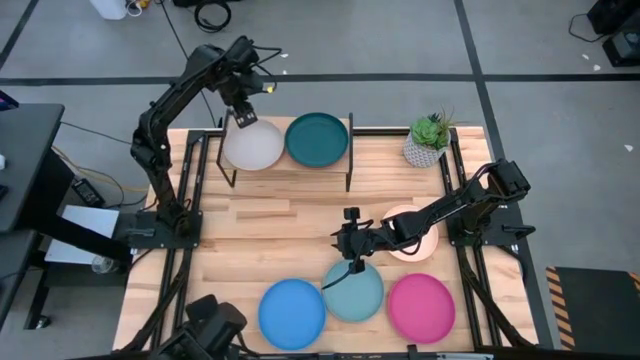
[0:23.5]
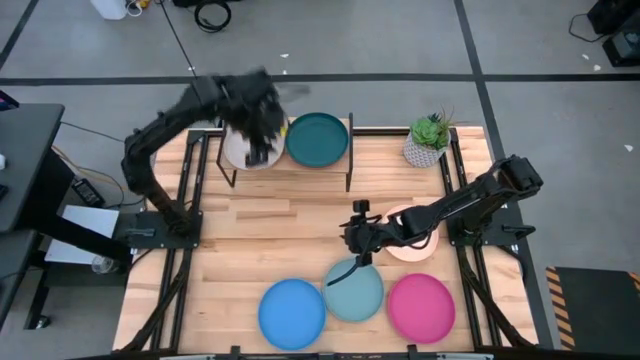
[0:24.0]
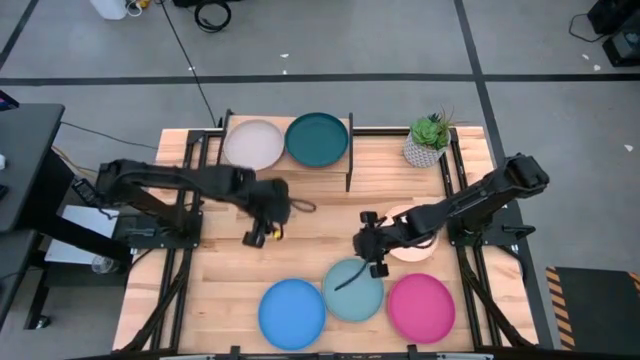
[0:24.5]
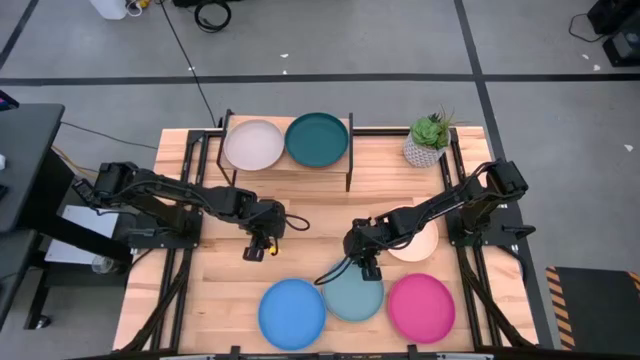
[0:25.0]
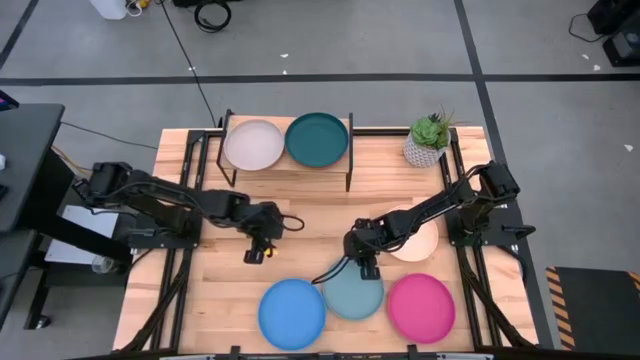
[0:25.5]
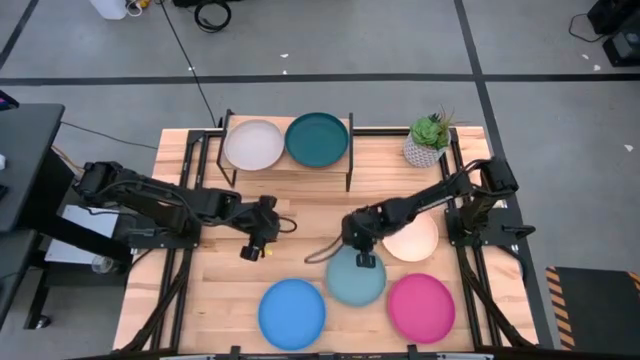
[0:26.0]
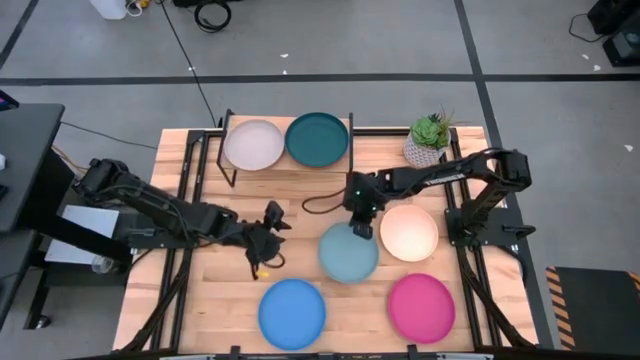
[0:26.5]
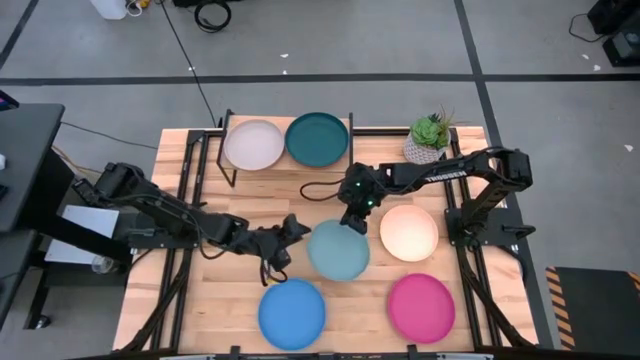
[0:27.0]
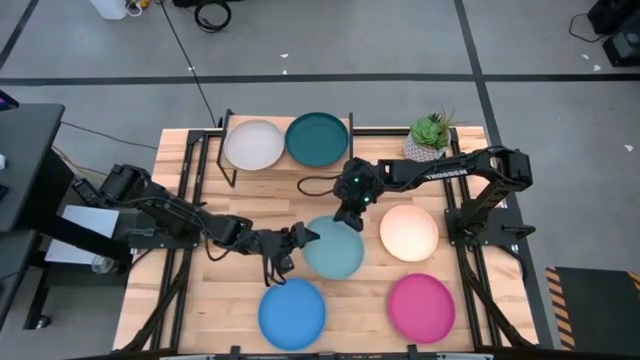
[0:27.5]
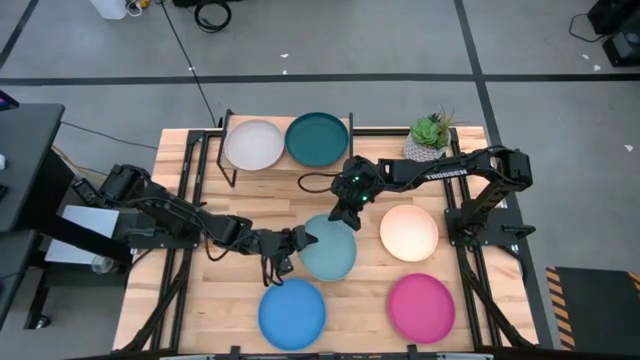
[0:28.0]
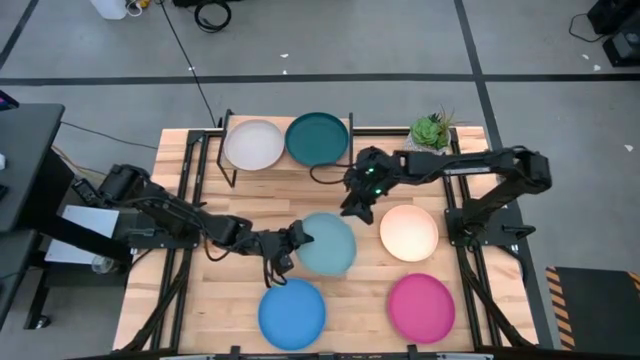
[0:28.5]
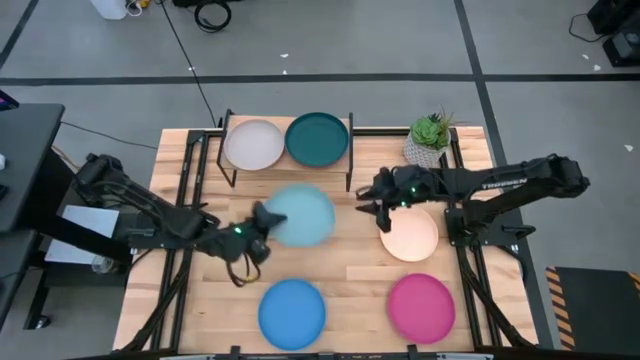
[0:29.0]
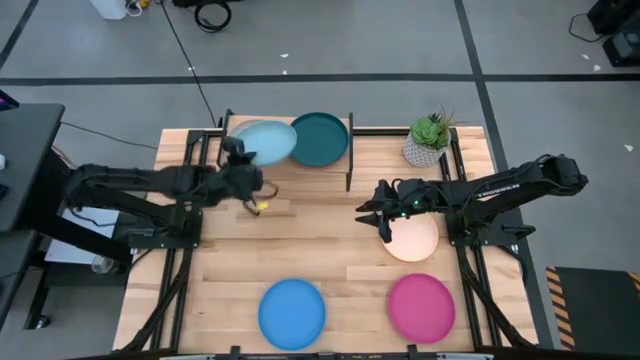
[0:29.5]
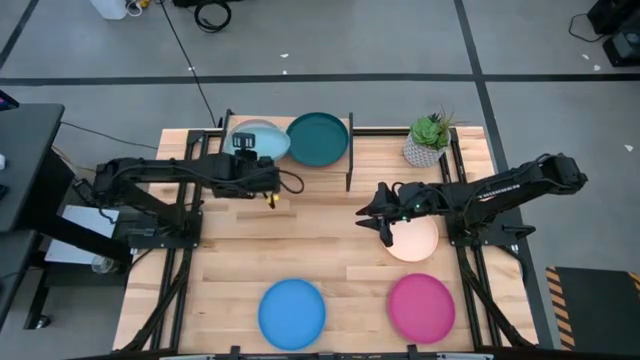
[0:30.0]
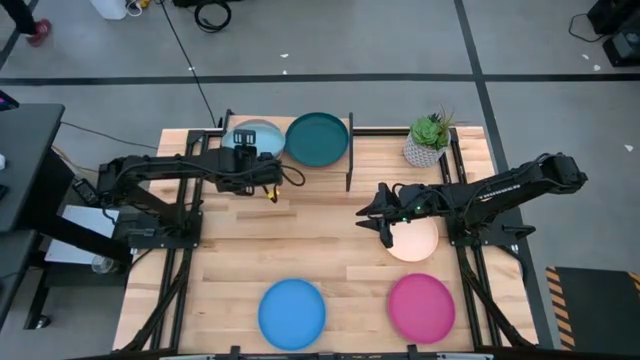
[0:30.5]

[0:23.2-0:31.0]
Task: Place and stack plates onto a shelf
Stack the light blue plate on top of the gray plate on the shelf

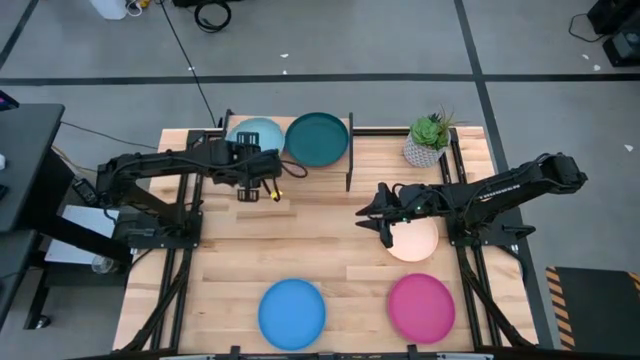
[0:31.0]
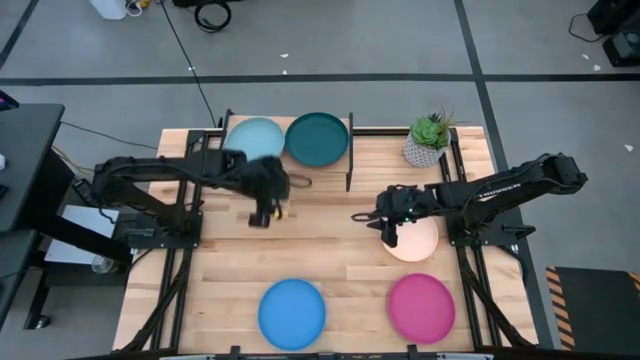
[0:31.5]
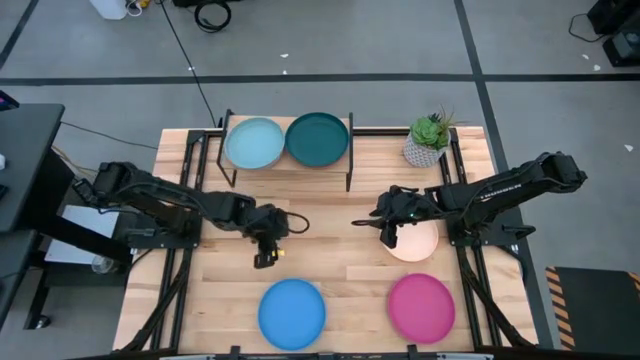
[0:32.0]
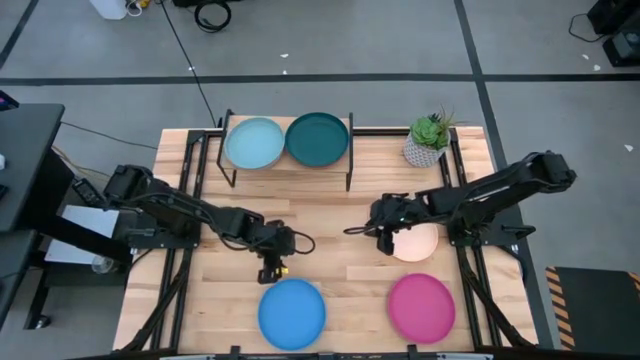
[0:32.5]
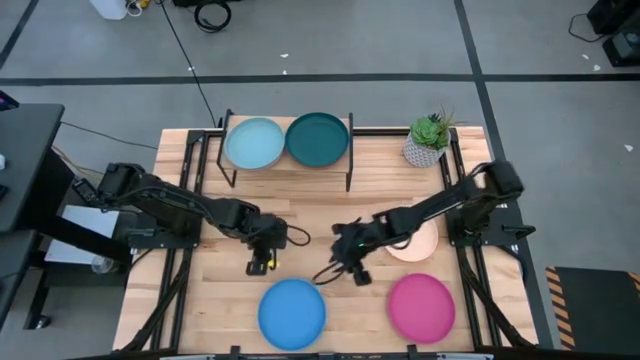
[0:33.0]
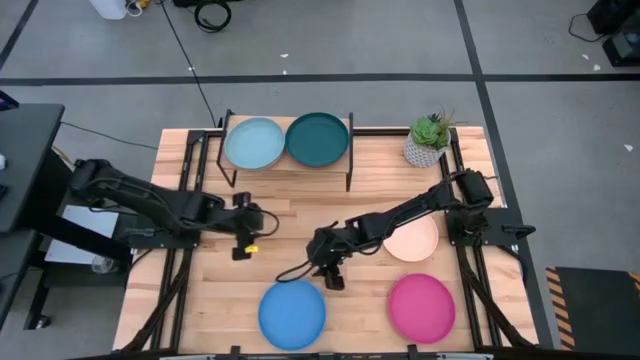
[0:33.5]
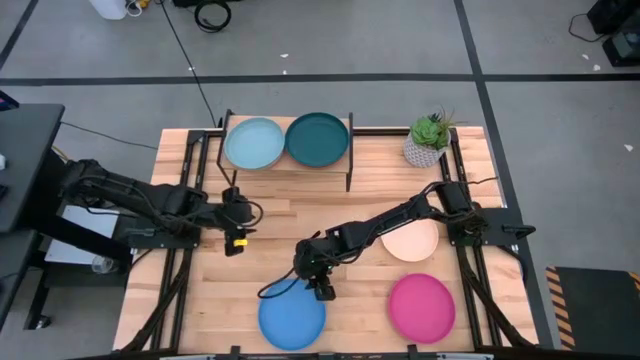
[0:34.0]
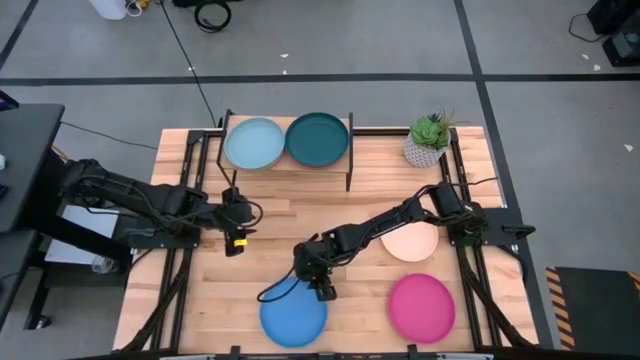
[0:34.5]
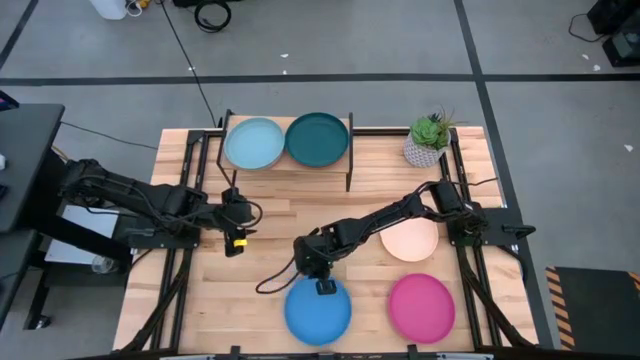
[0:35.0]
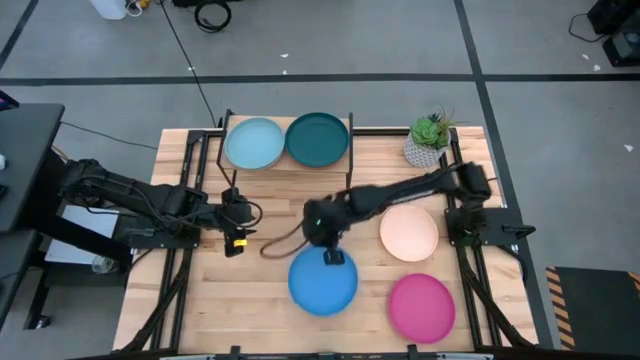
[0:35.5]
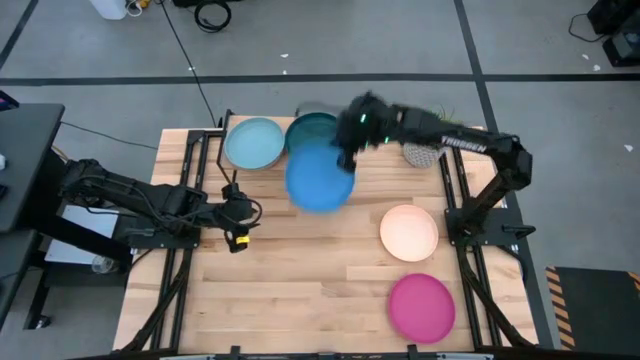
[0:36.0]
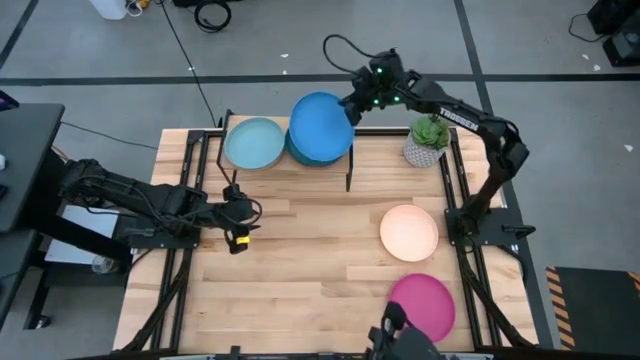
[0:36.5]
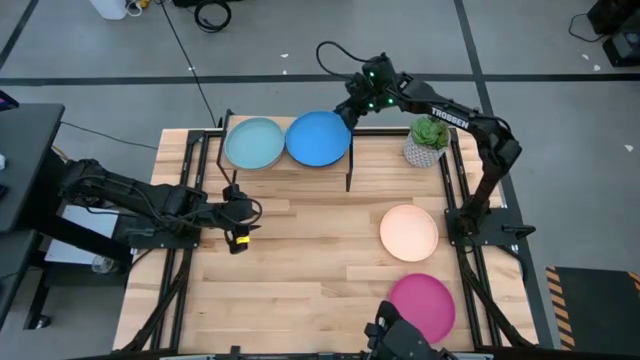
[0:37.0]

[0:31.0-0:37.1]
Stack the blue plate on top of the green plate on the shelf

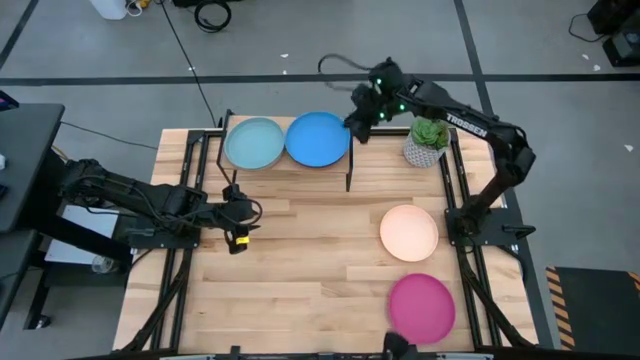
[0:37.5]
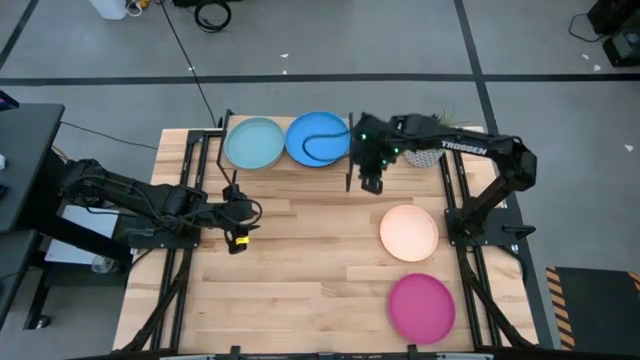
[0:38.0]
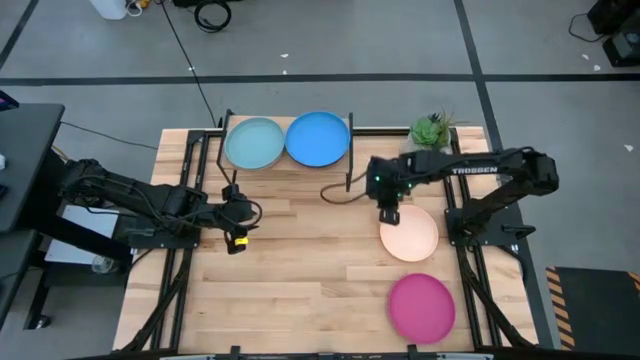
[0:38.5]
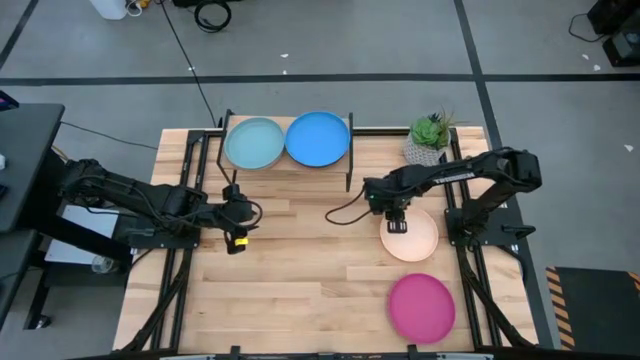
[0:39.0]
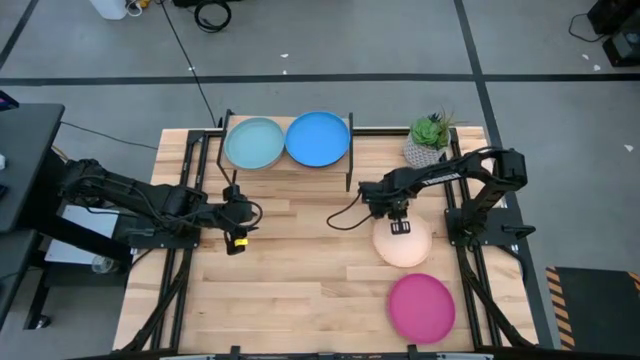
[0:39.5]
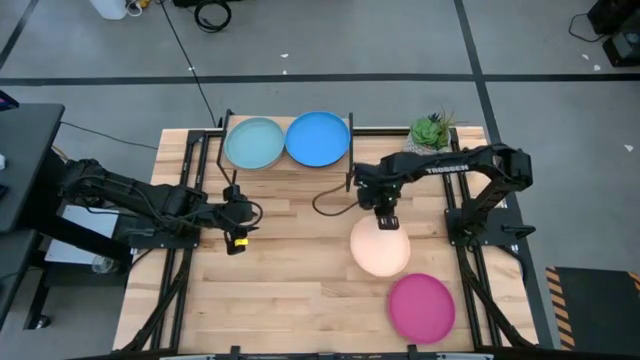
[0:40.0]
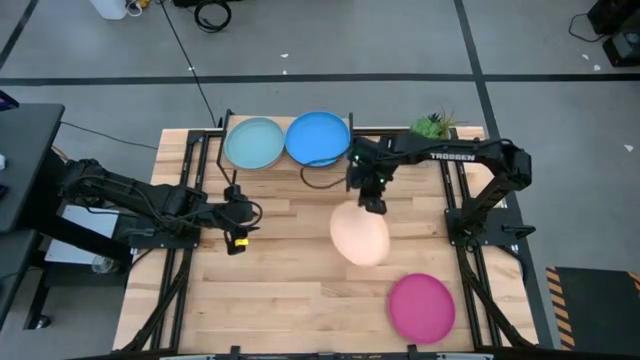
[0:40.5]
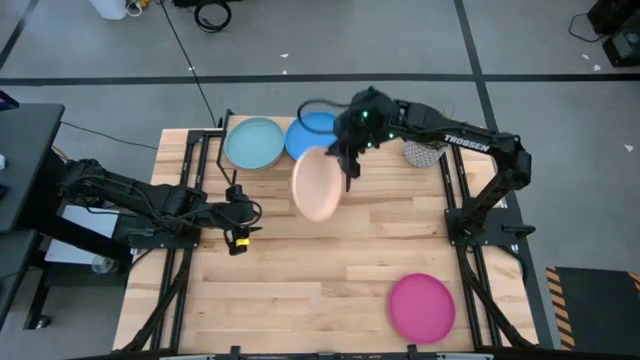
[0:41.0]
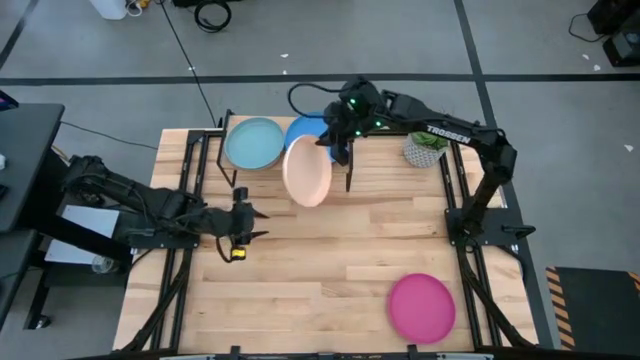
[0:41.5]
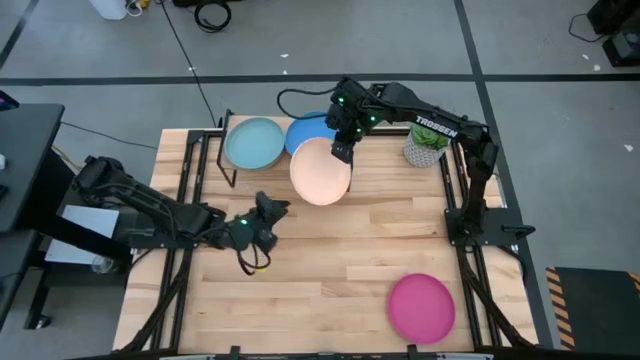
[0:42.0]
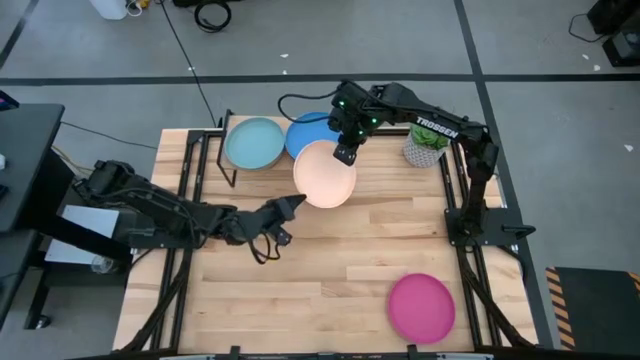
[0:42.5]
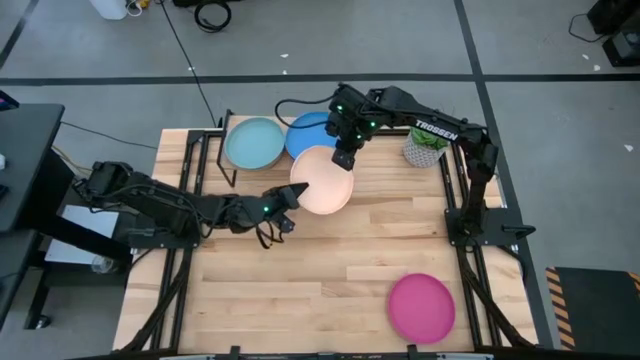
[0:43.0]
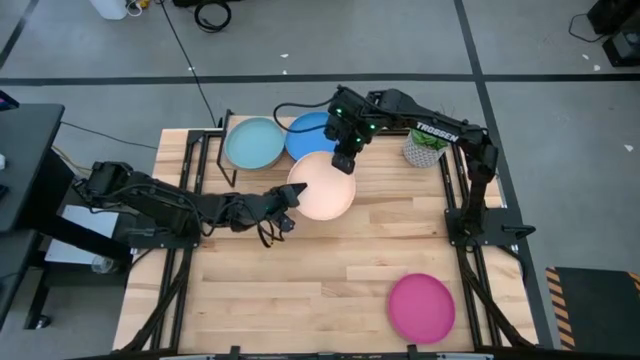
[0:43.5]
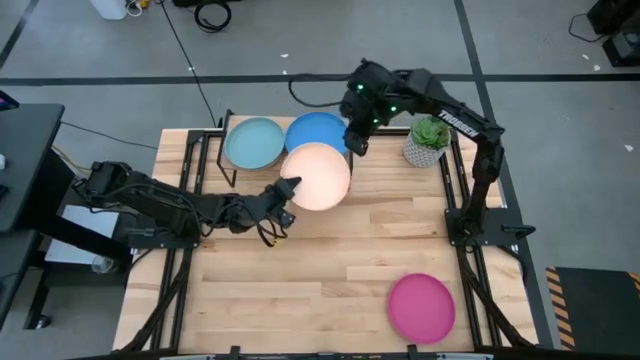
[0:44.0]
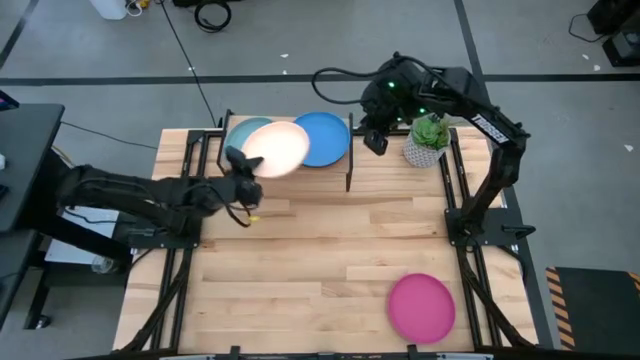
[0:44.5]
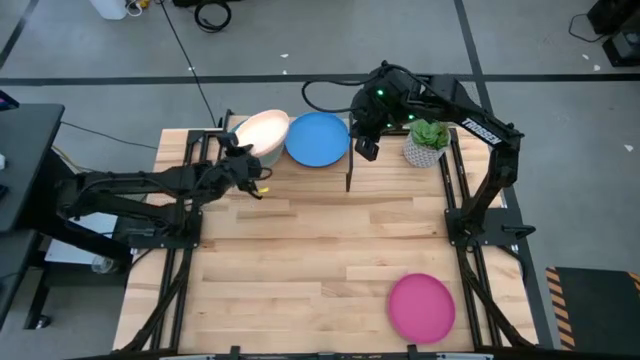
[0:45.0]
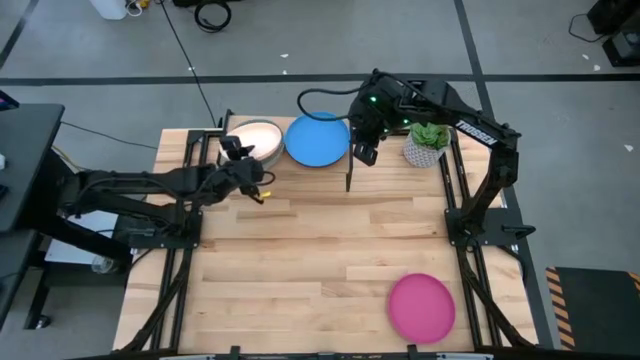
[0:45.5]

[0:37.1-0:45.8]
Stack the light orange plate on top of the light blue plate on the shelf
